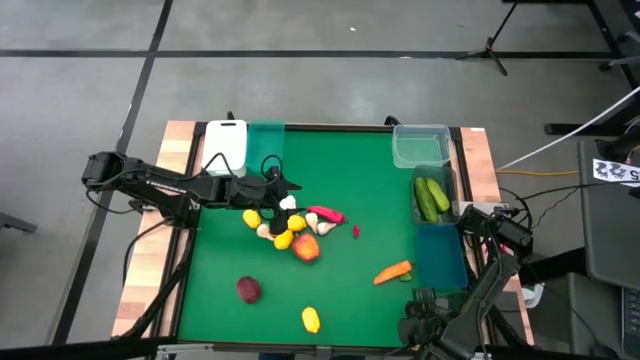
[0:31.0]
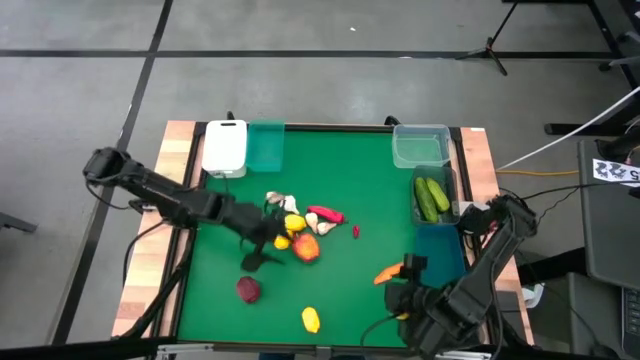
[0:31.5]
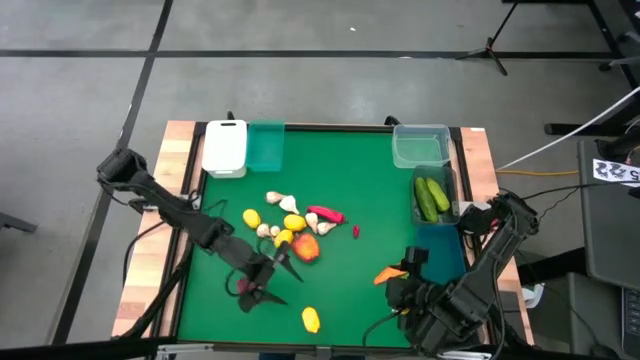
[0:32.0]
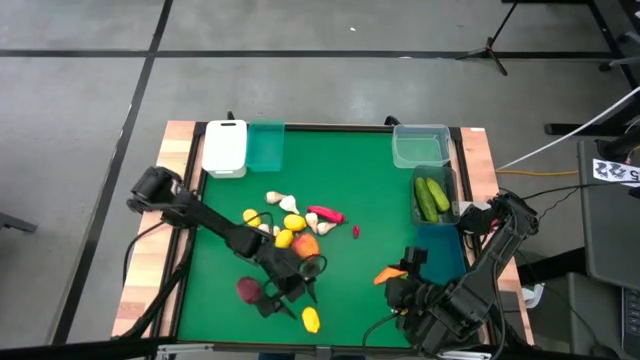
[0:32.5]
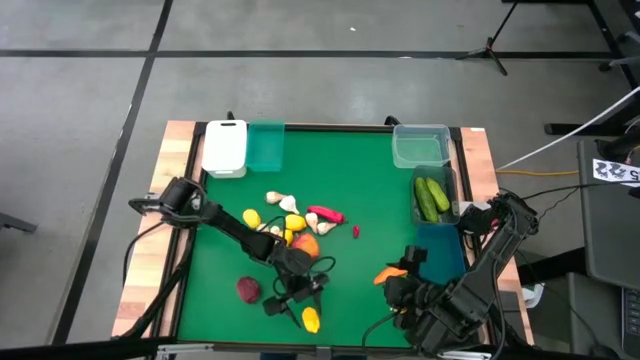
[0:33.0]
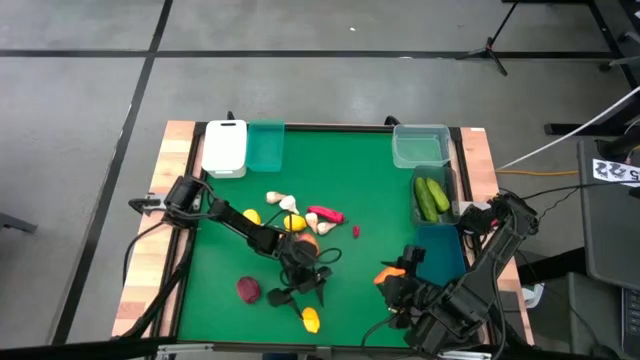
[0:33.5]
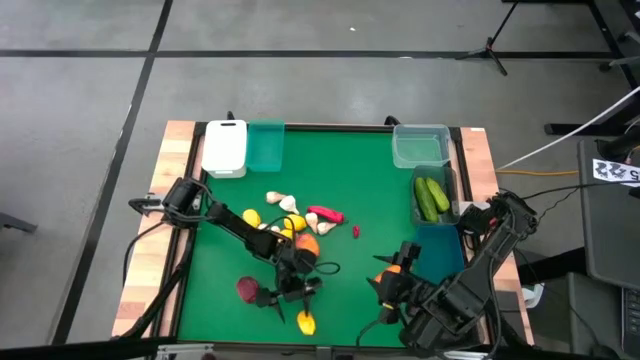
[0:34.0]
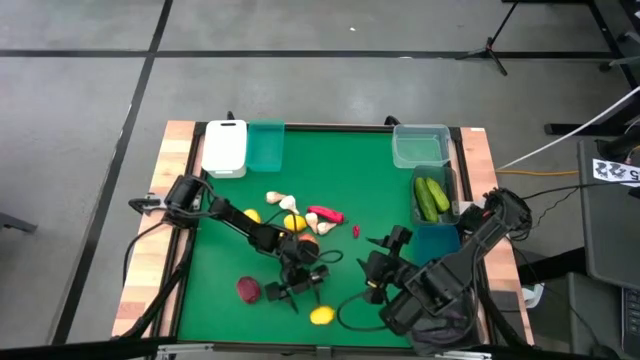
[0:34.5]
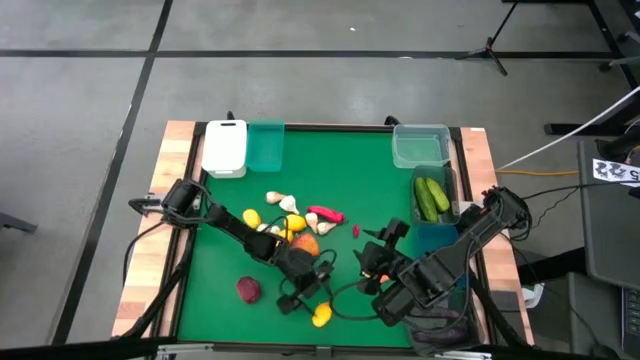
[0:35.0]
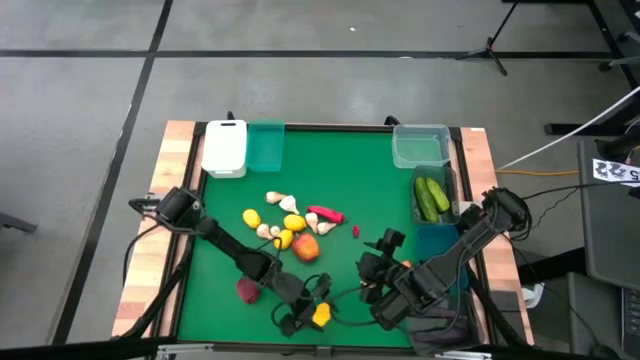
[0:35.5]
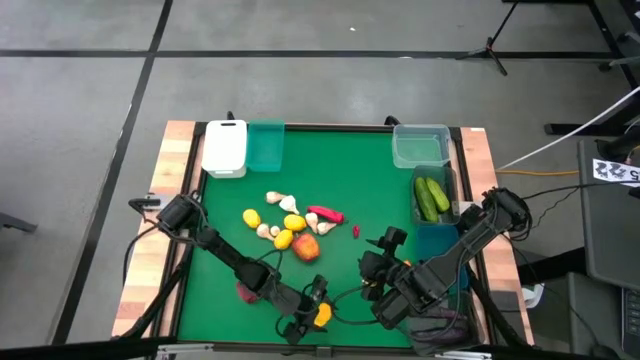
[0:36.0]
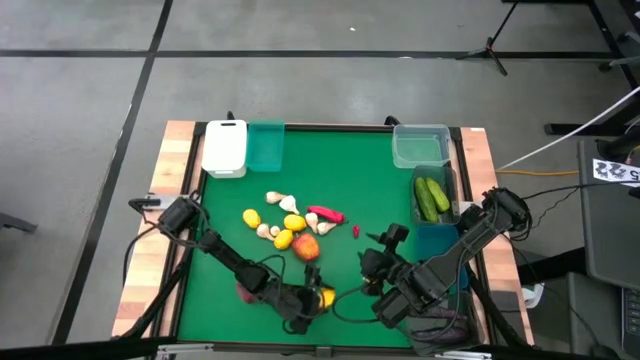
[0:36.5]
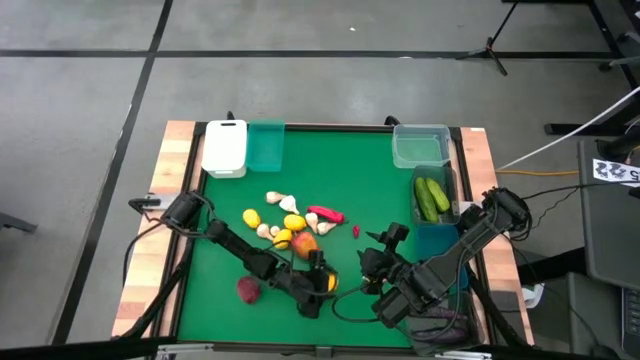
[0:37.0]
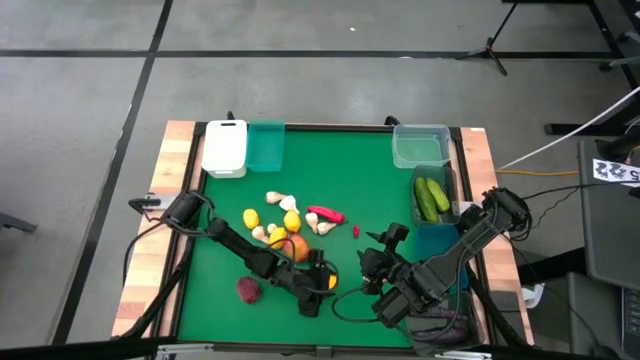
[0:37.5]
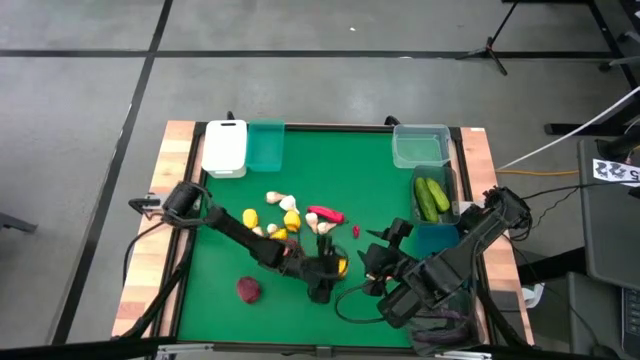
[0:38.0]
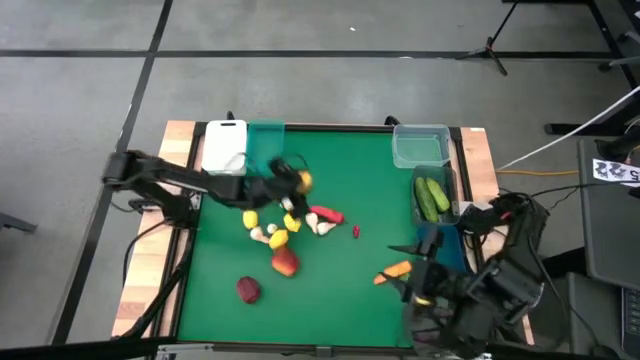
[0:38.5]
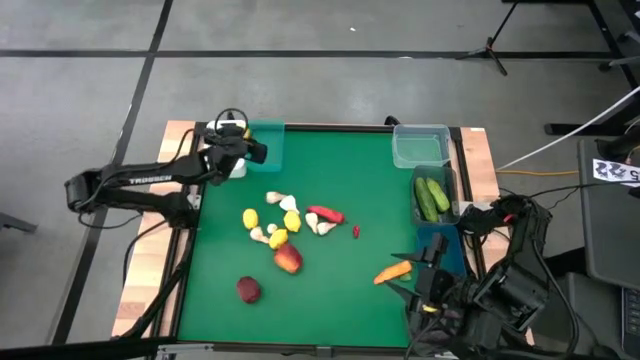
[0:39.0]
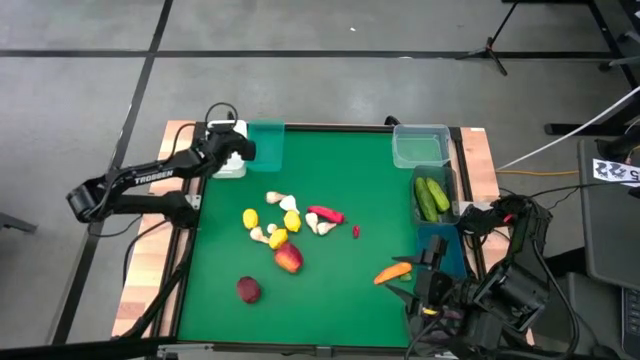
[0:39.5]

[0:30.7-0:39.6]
Task: Sort produce into baskets
Put the yellow lemon into the white bin

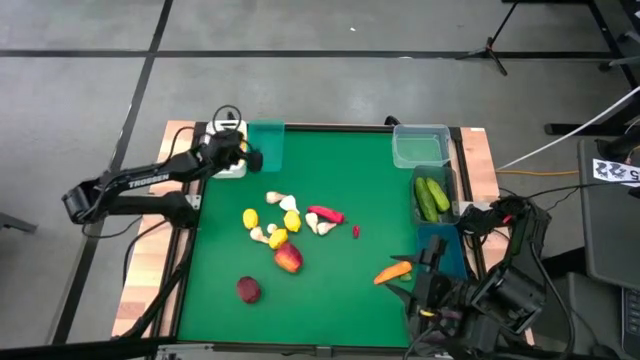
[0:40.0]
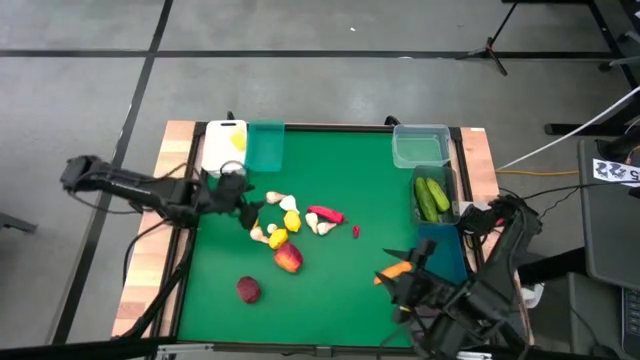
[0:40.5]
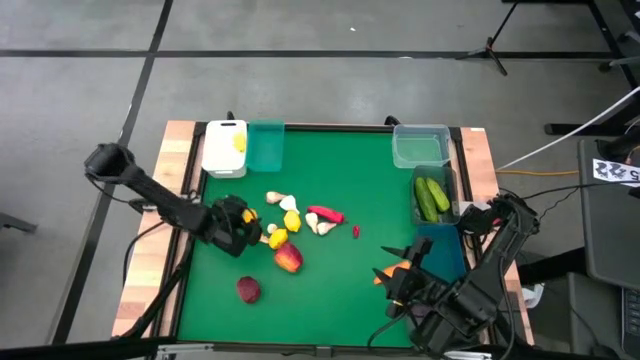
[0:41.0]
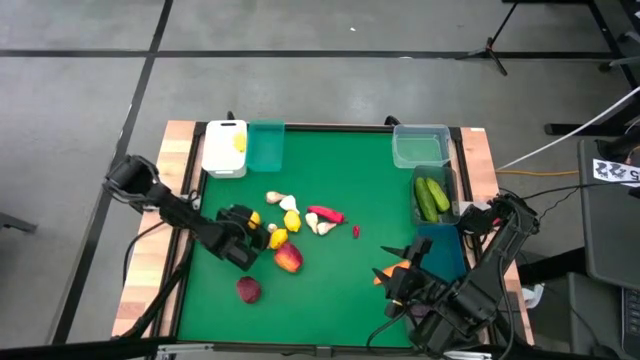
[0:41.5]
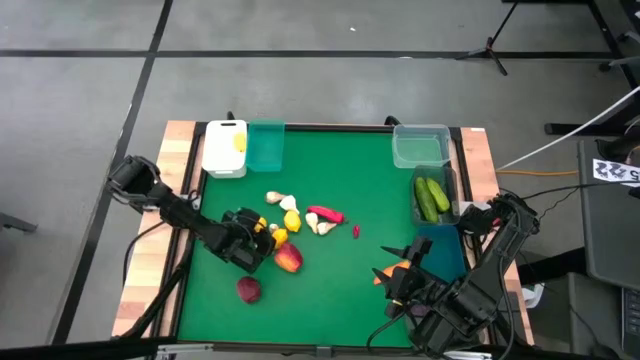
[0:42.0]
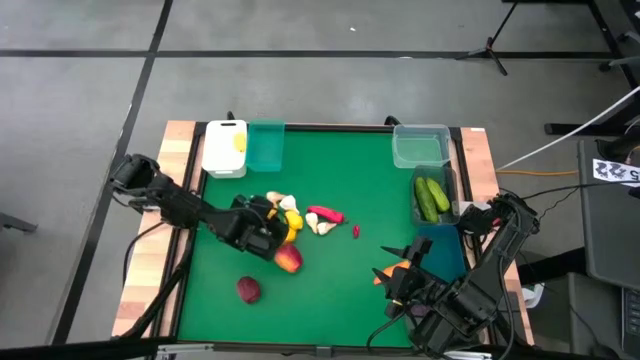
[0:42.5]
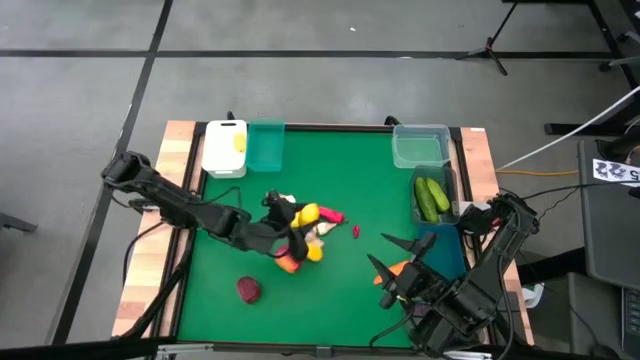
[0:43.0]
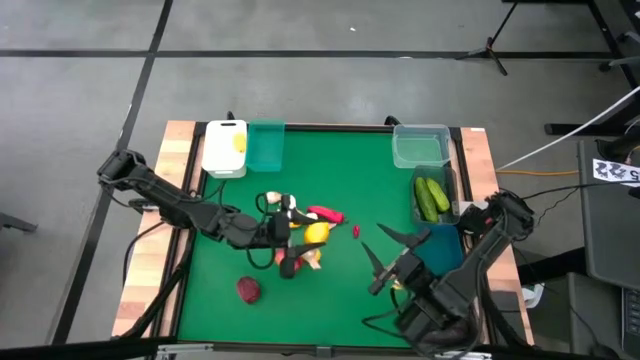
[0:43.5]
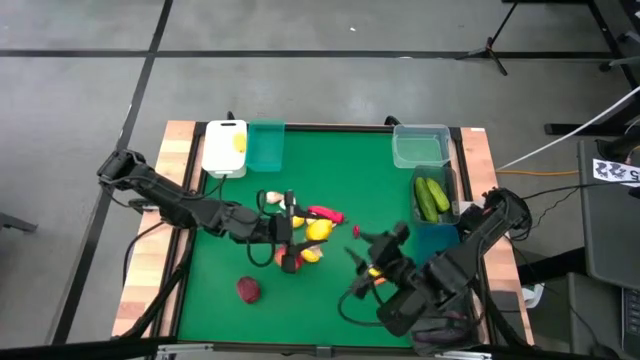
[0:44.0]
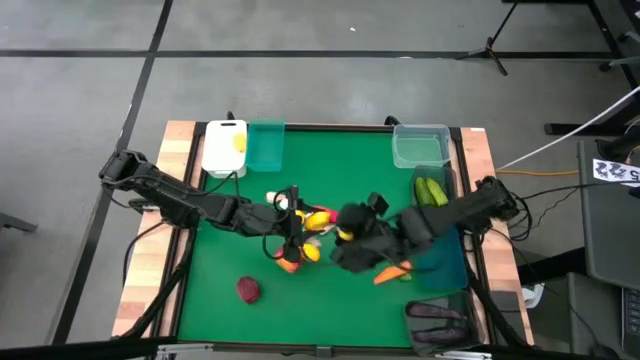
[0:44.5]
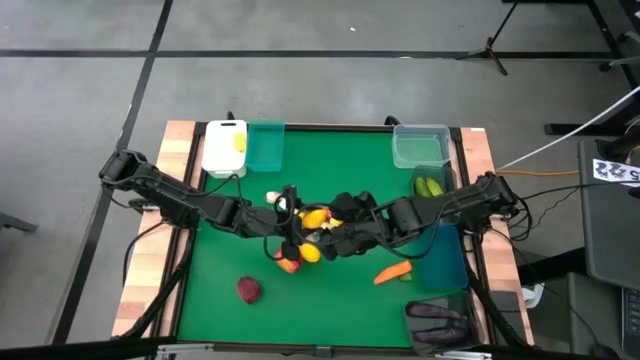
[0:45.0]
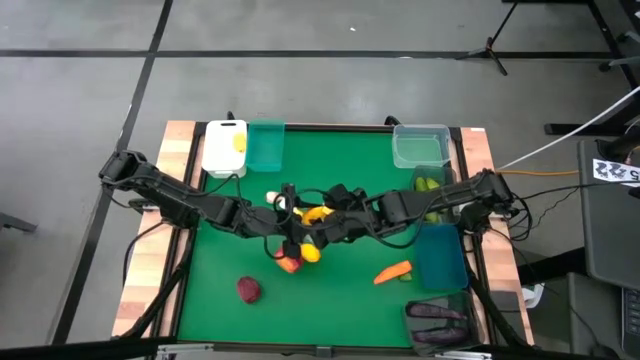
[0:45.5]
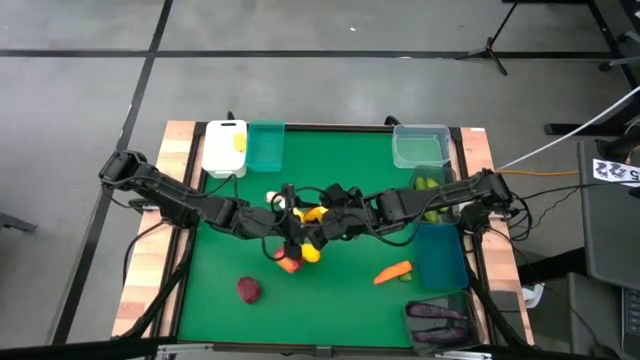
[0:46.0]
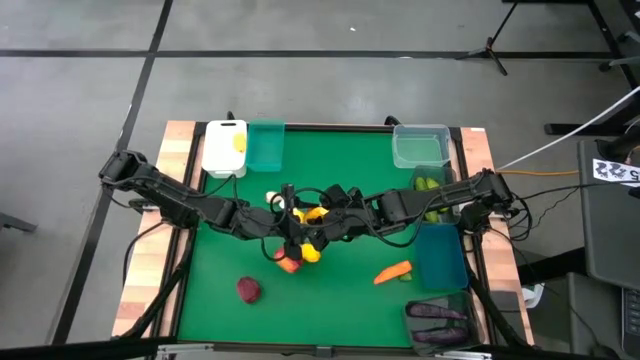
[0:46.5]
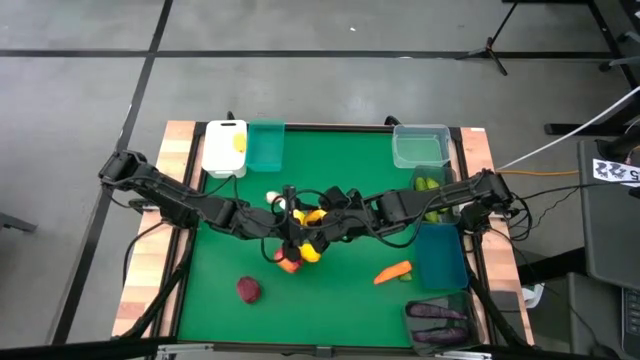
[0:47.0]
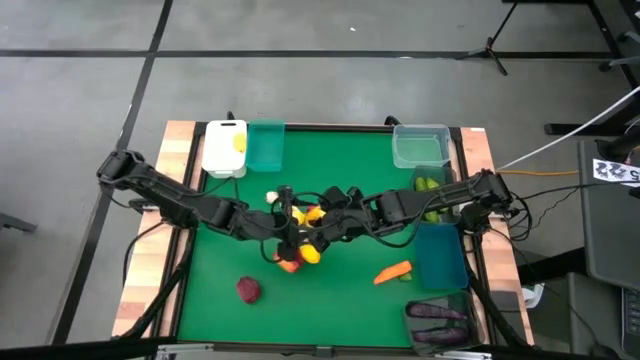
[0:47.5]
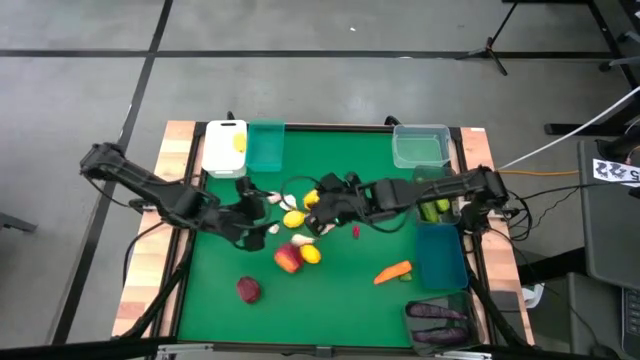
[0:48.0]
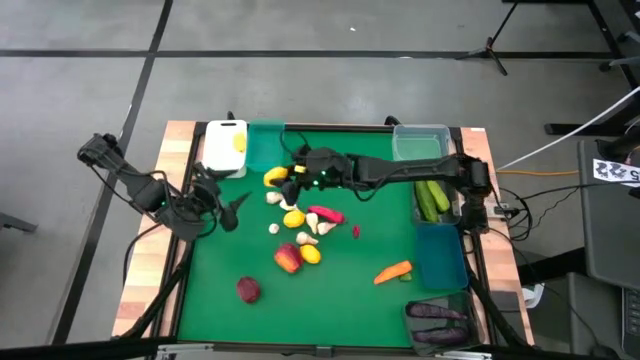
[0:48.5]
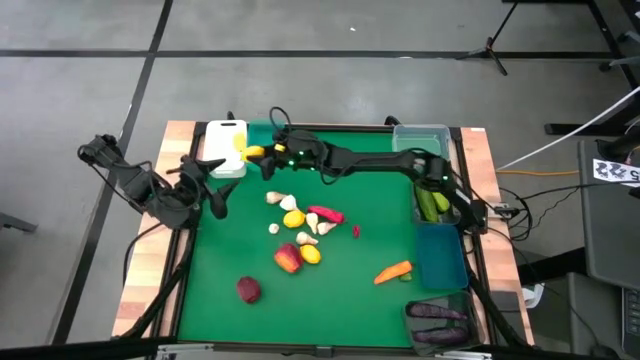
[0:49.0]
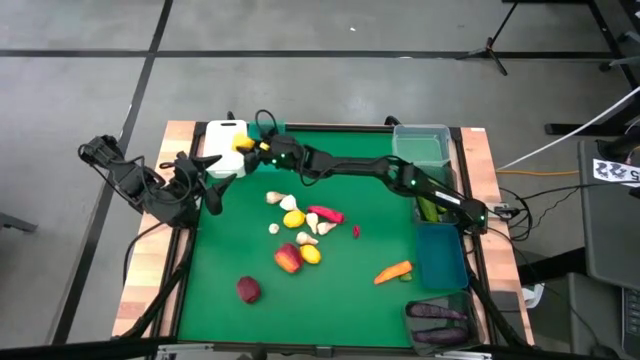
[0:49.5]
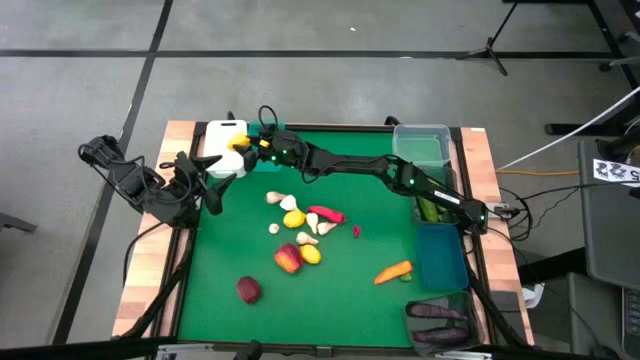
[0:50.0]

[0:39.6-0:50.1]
Put the yellow lemon into the white bin

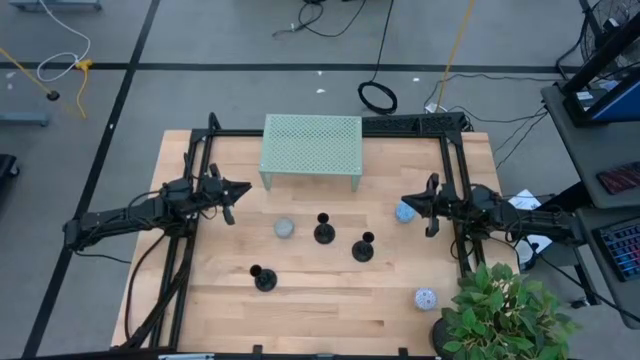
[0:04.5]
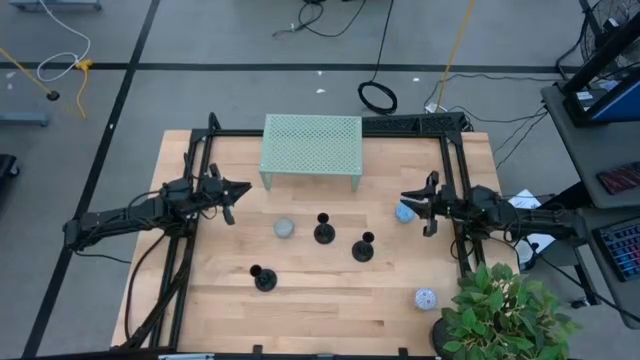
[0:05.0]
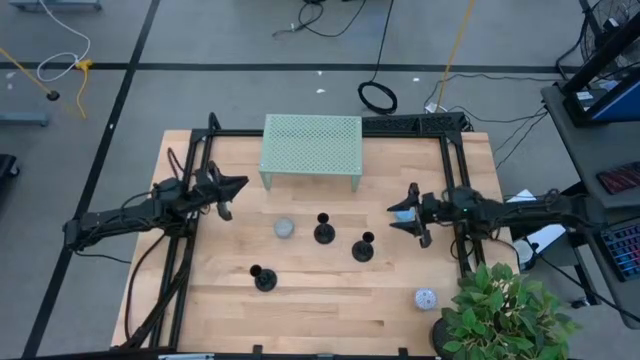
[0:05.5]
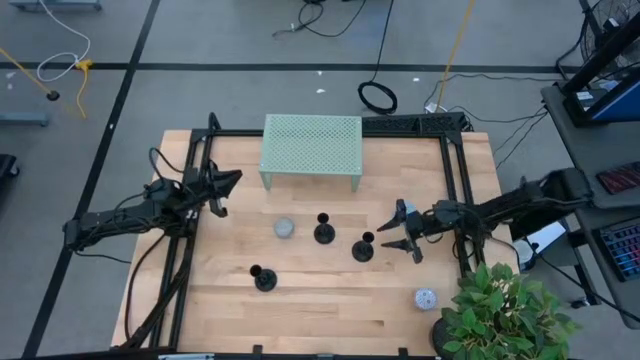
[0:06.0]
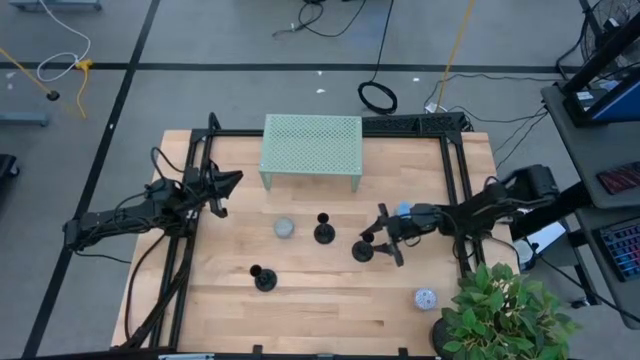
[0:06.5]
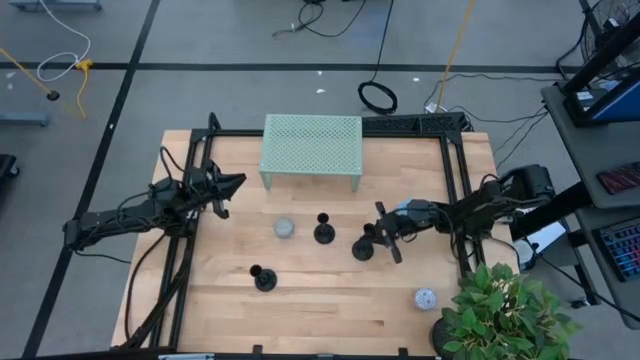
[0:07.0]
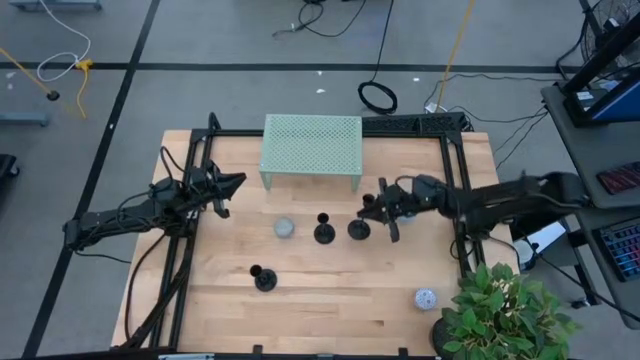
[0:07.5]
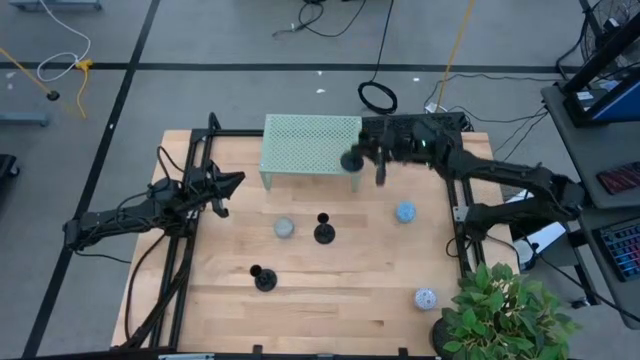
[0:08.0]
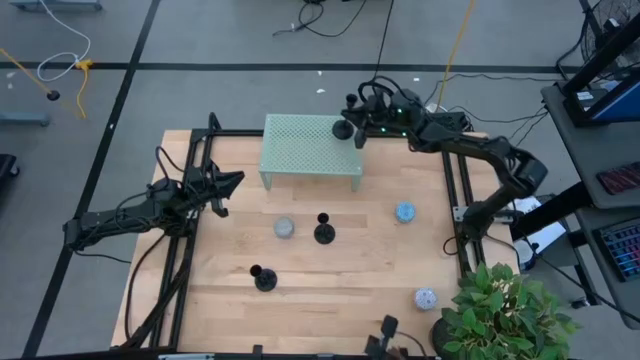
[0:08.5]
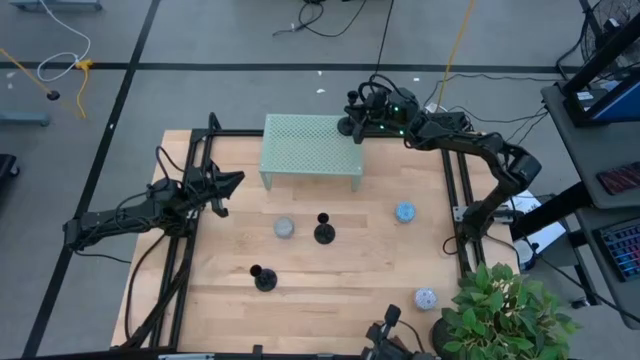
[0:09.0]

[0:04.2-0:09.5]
Task: Pick & Place candle stick holders
Put the right black candle holder on the shelf
